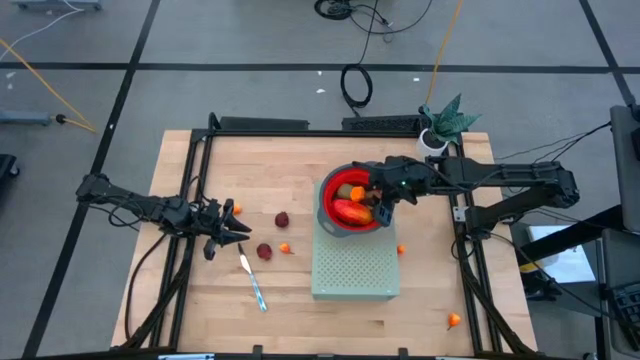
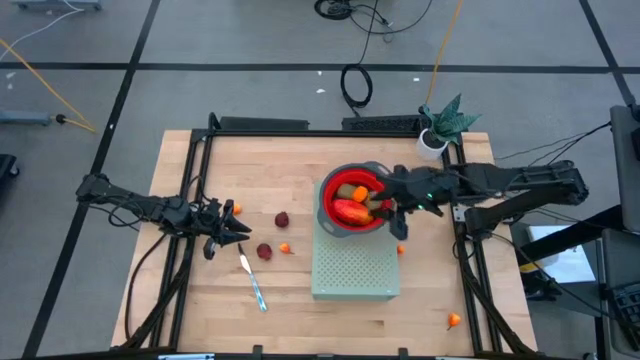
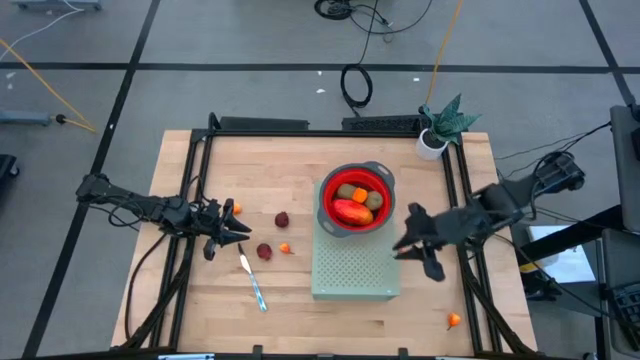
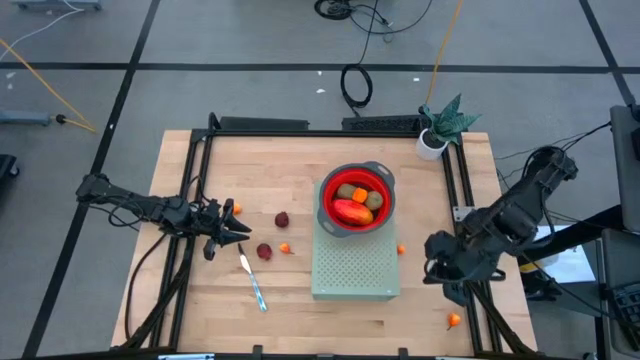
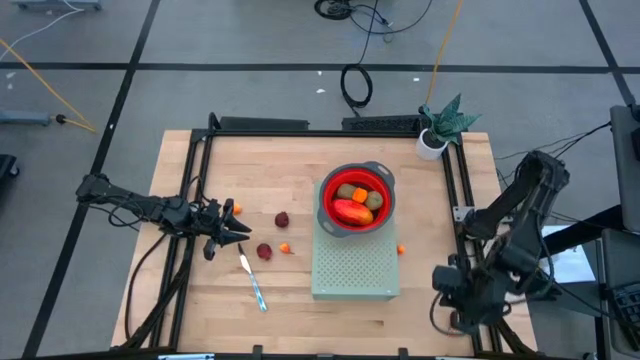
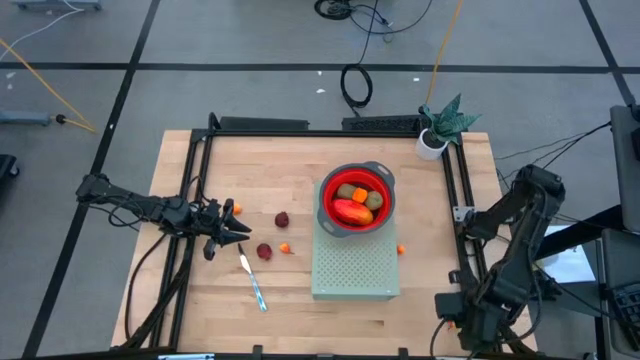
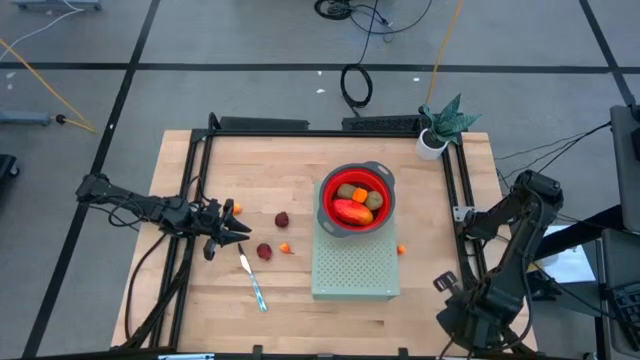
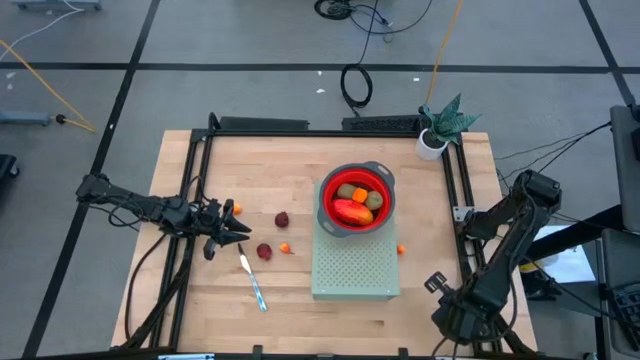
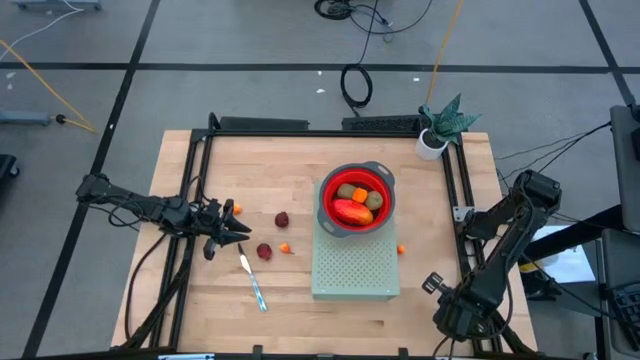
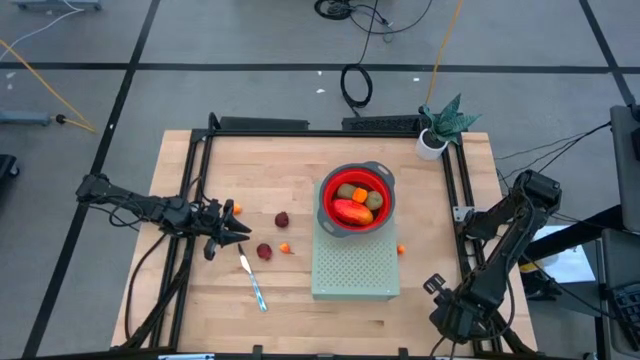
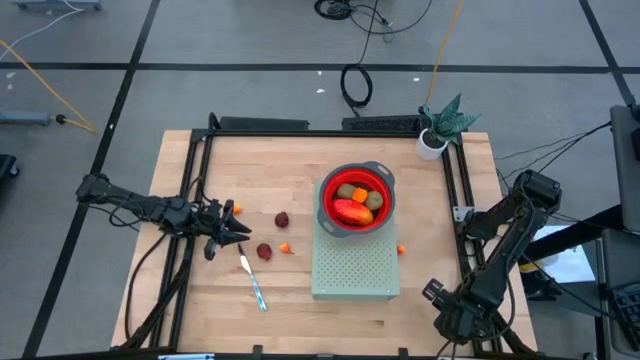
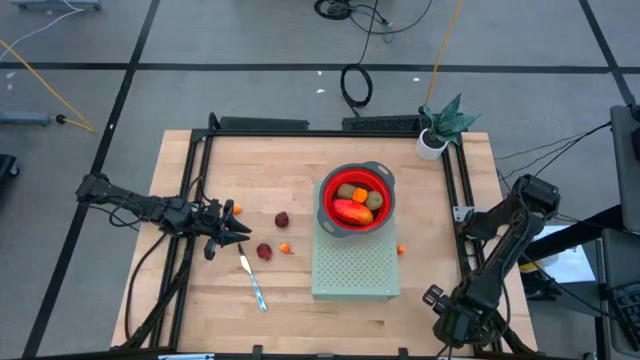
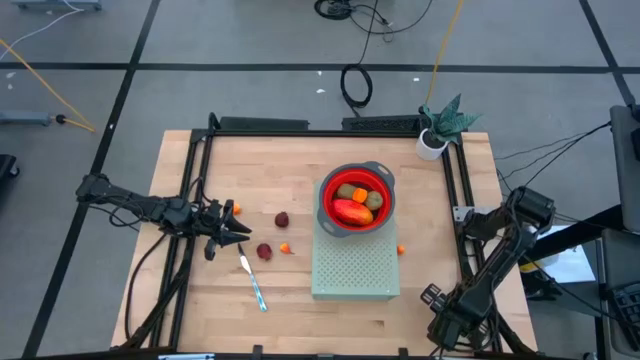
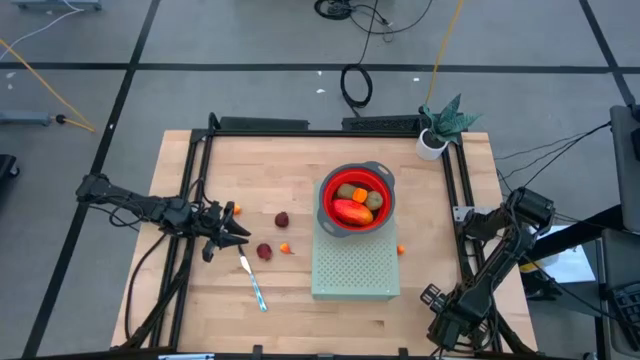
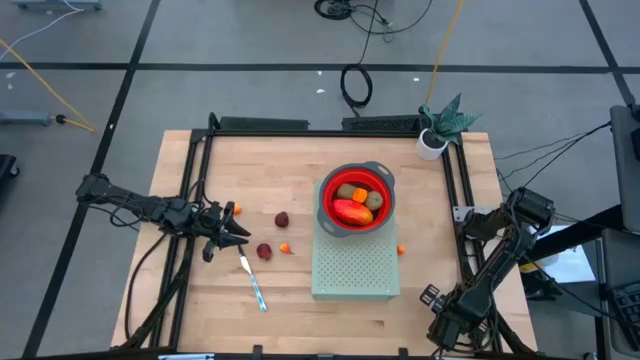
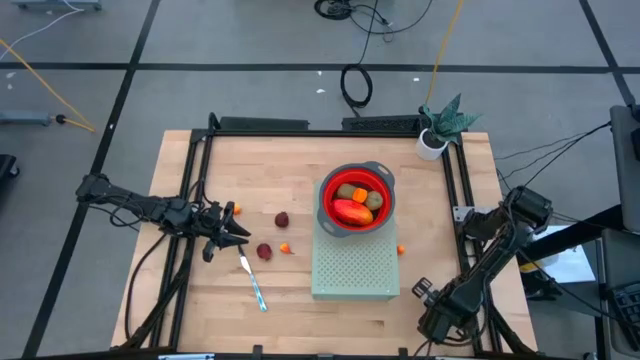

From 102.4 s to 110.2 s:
Task: Pick & Place Fruit
Put the peach into the red strainer bowl on the shelf

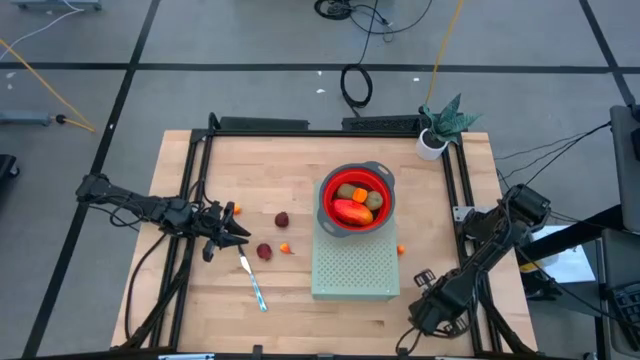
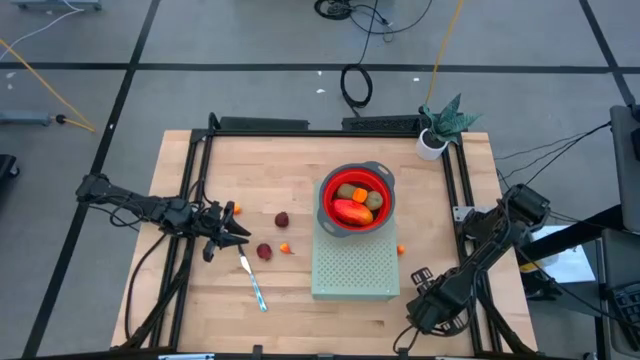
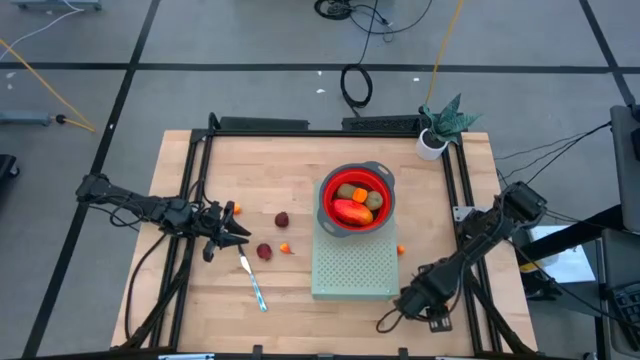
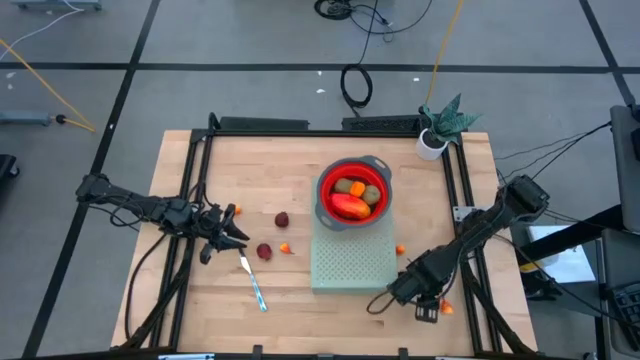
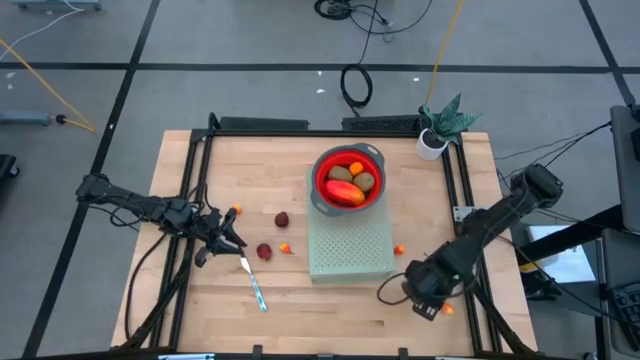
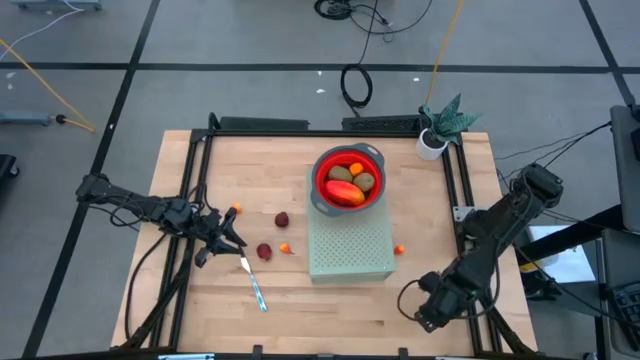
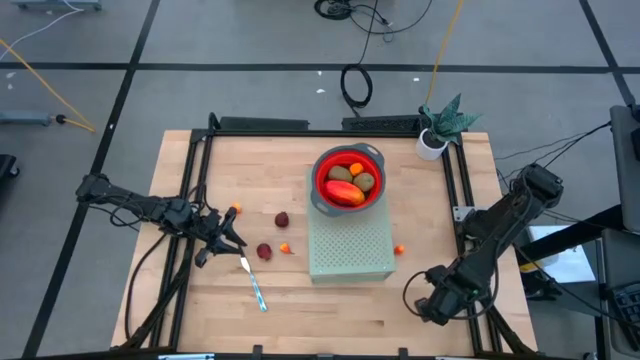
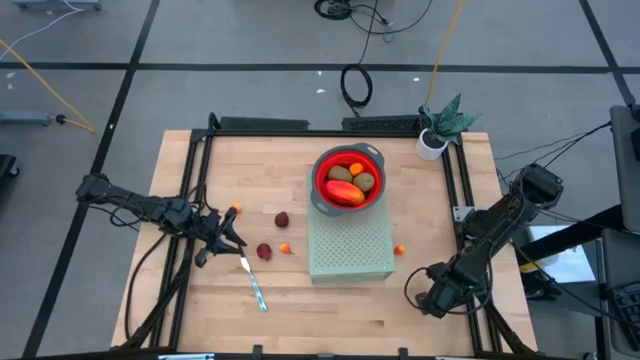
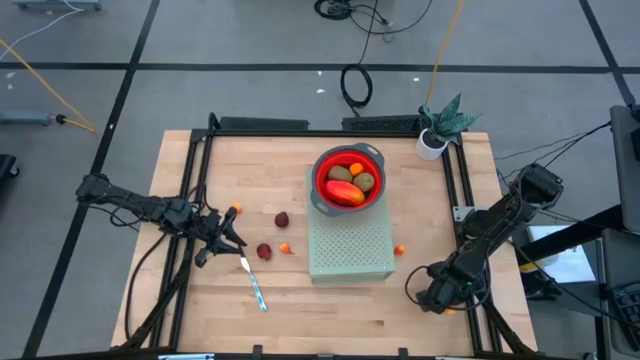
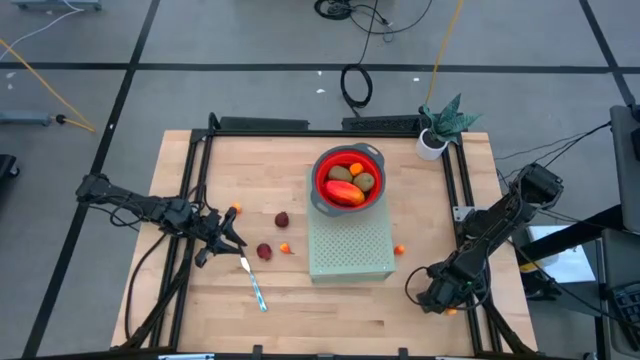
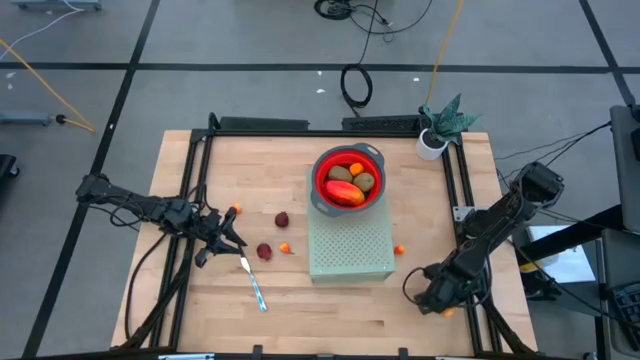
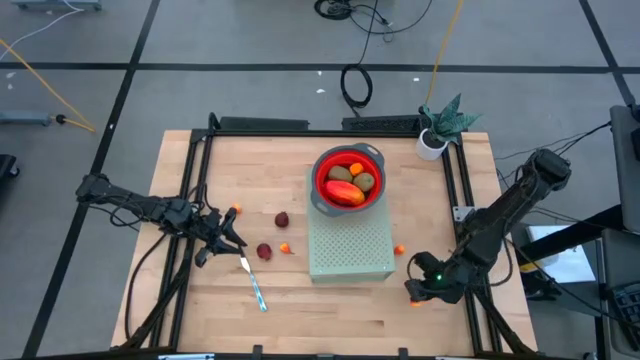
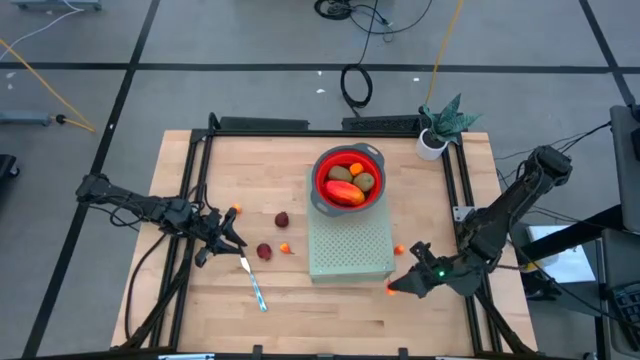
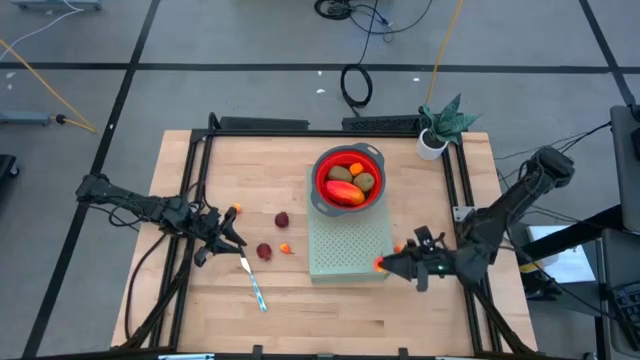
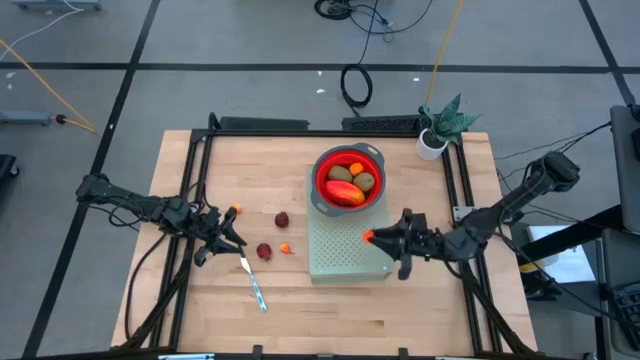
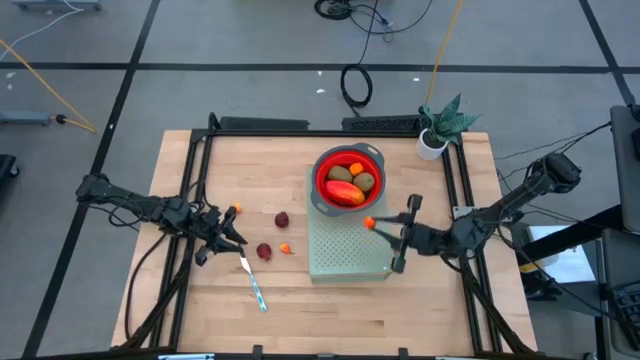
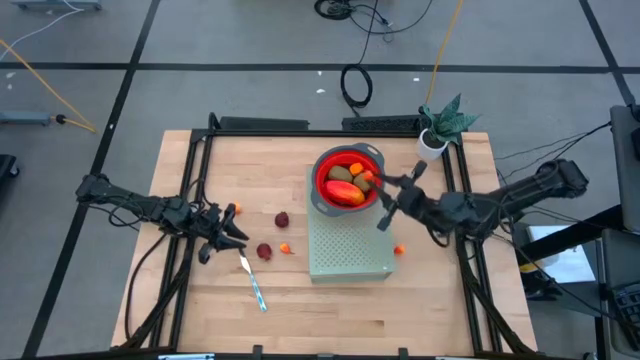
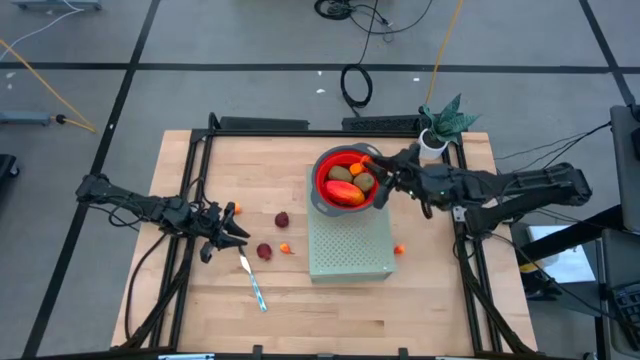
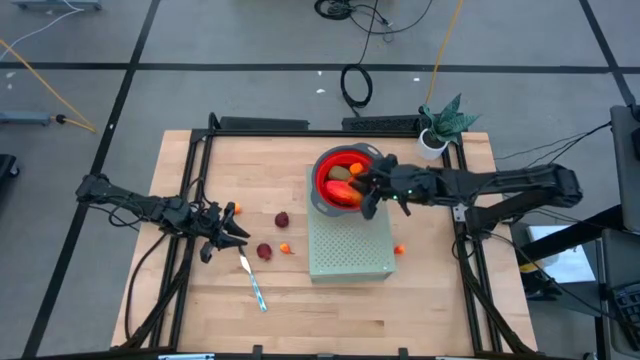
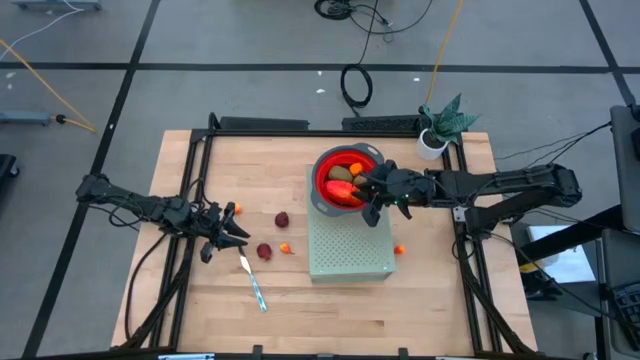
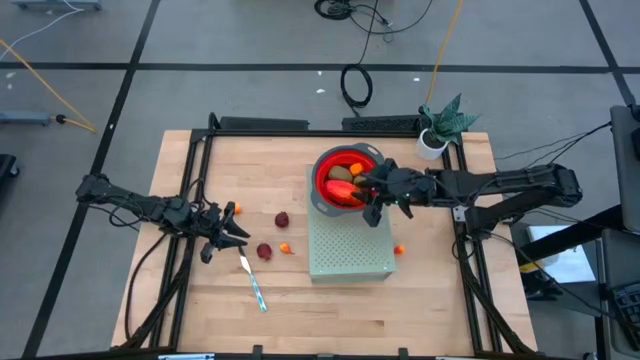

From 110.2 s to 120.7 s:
Put the peach into the red strainer bowl on the shelf

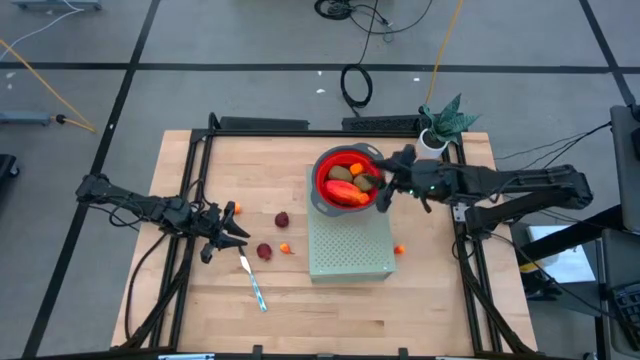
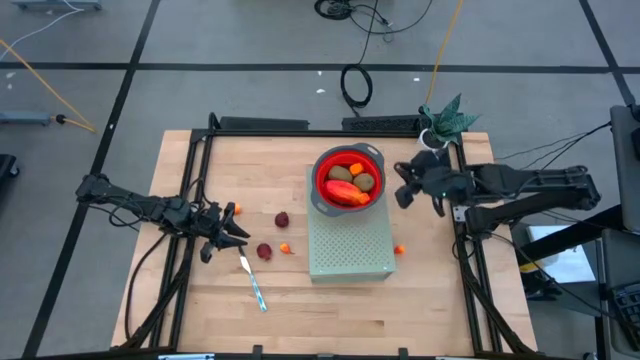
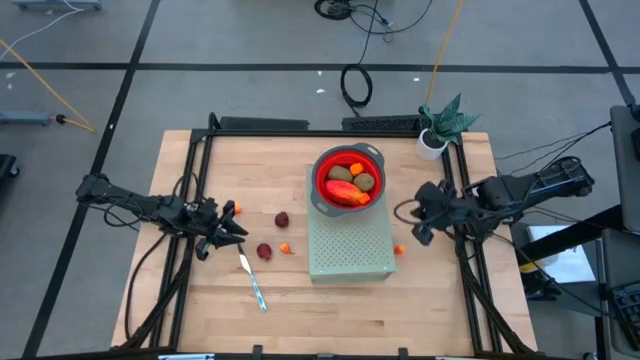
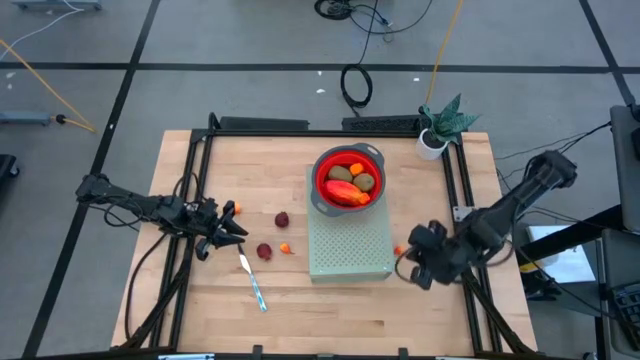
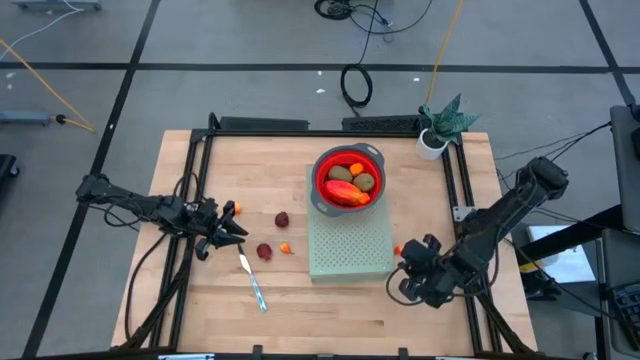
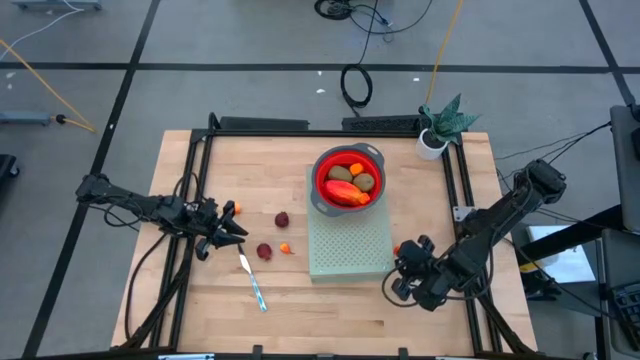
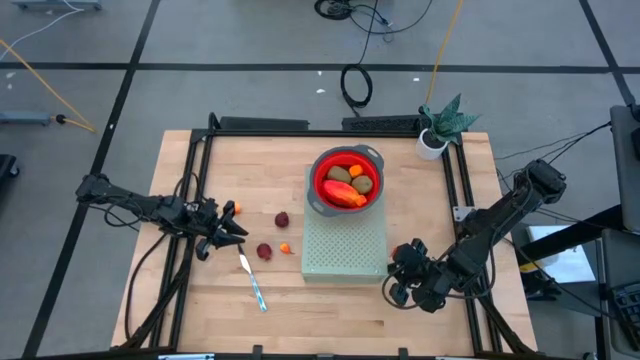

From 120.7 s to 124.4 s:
Adjust the shelf
